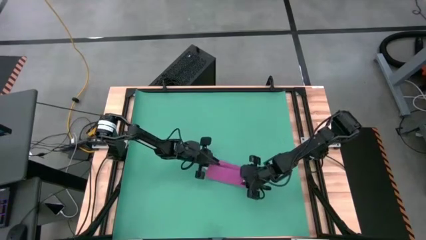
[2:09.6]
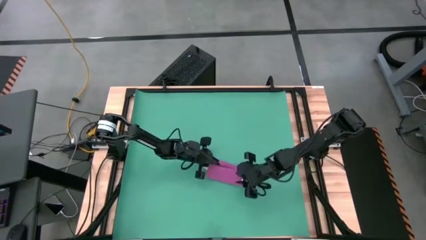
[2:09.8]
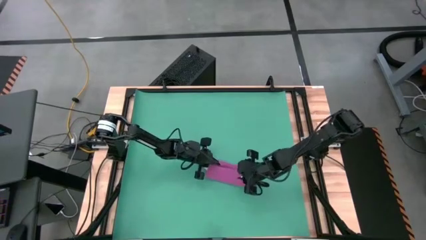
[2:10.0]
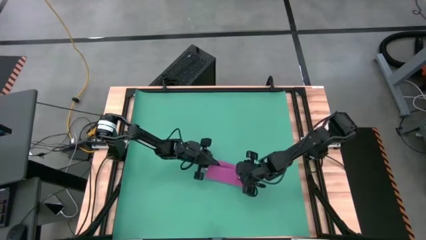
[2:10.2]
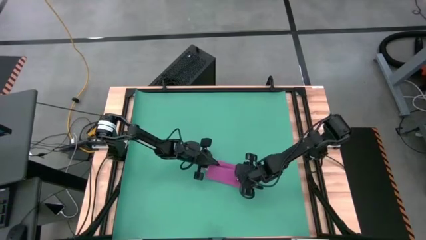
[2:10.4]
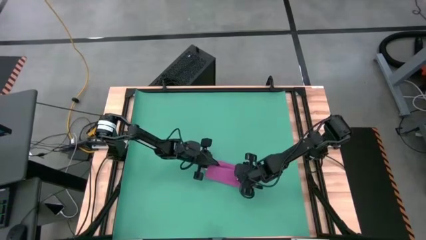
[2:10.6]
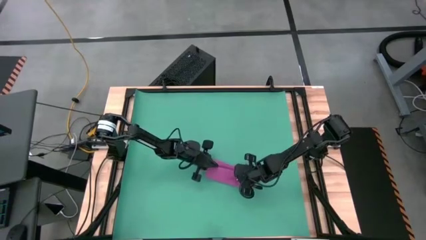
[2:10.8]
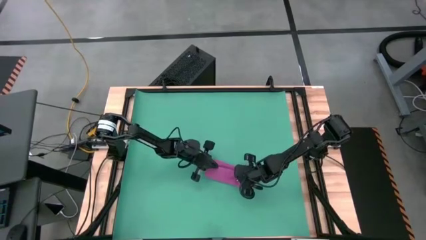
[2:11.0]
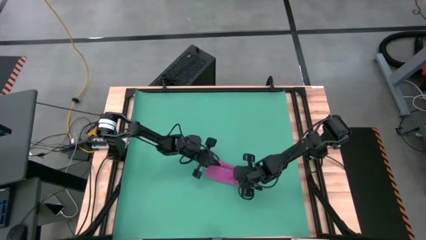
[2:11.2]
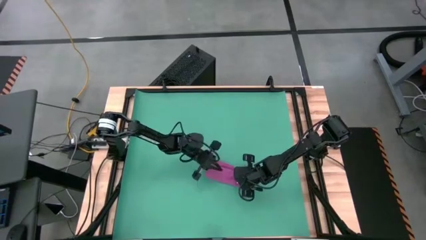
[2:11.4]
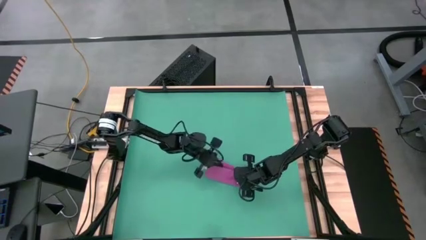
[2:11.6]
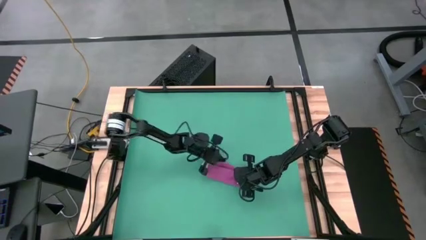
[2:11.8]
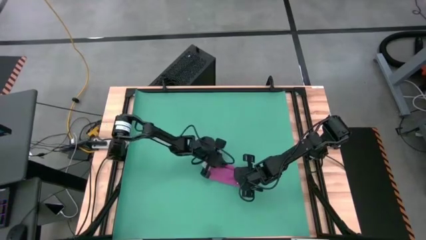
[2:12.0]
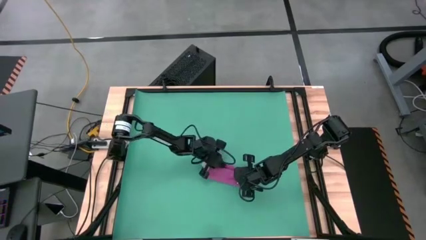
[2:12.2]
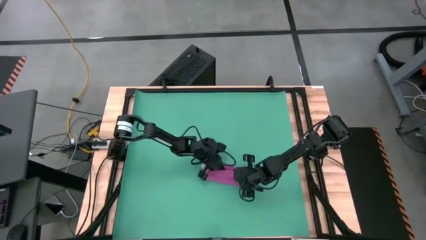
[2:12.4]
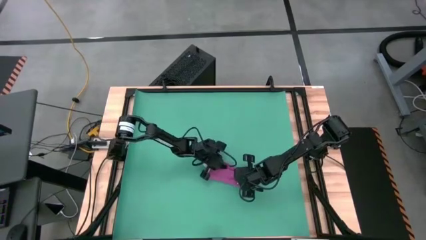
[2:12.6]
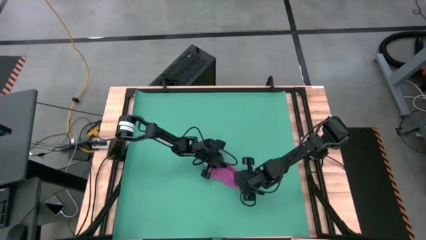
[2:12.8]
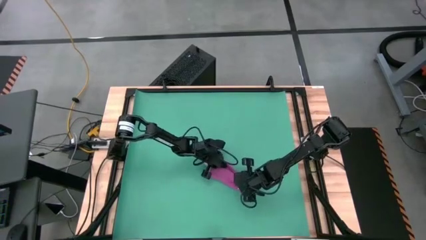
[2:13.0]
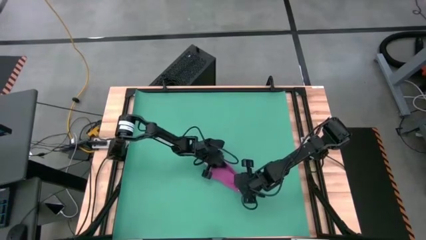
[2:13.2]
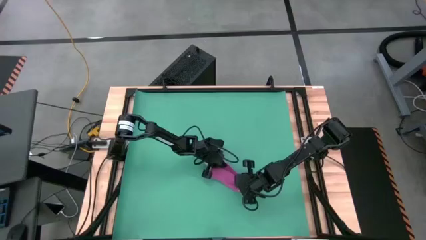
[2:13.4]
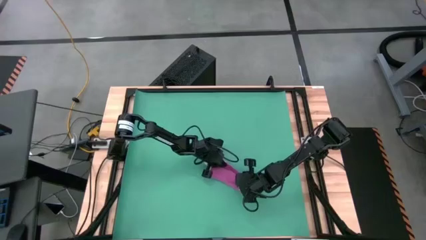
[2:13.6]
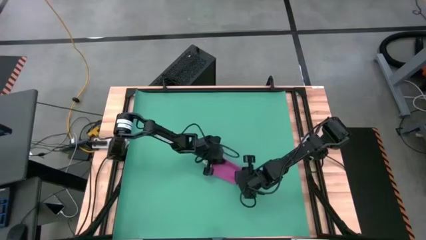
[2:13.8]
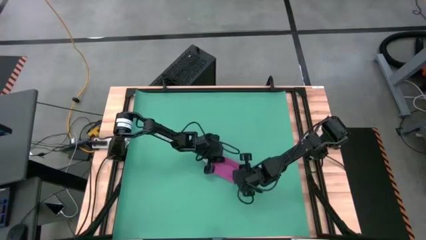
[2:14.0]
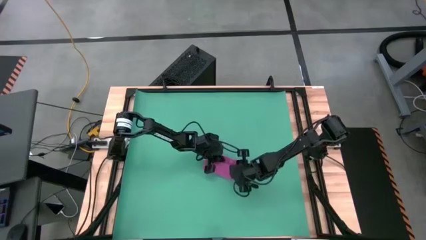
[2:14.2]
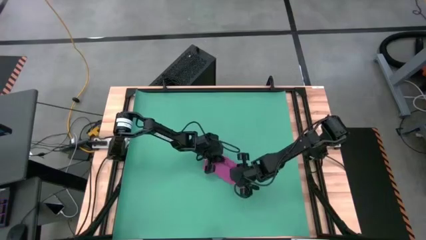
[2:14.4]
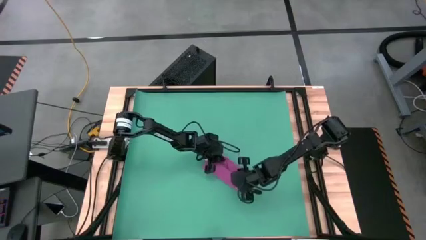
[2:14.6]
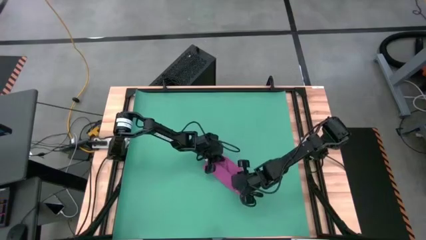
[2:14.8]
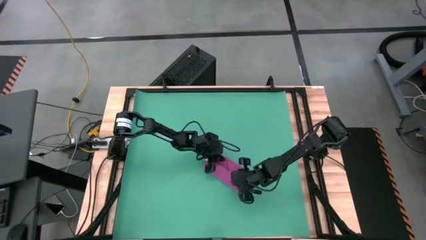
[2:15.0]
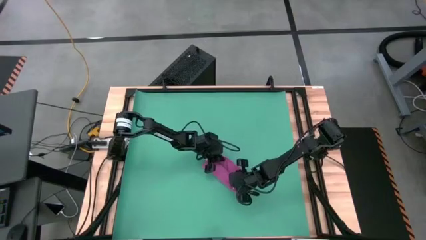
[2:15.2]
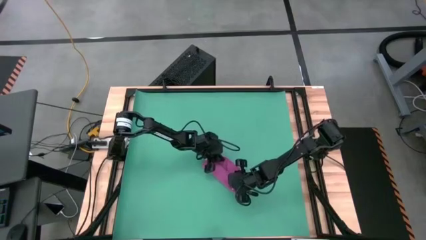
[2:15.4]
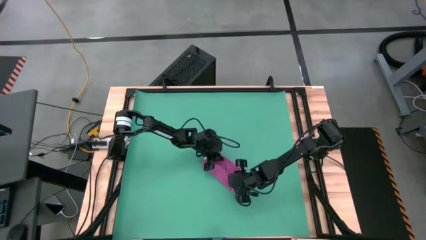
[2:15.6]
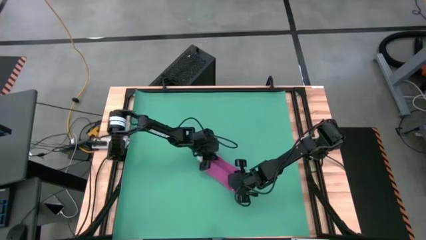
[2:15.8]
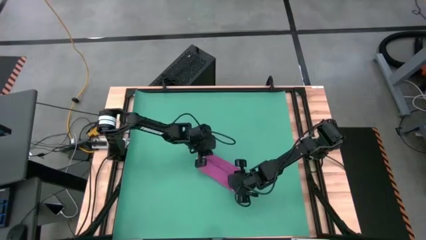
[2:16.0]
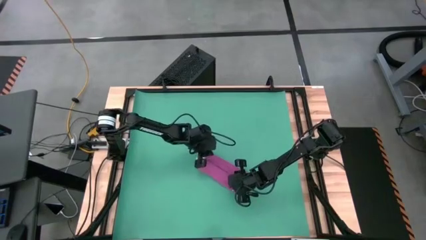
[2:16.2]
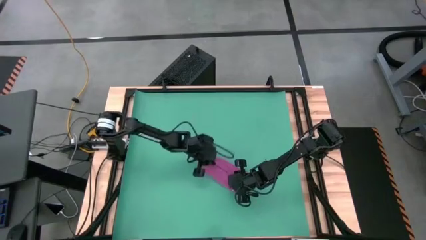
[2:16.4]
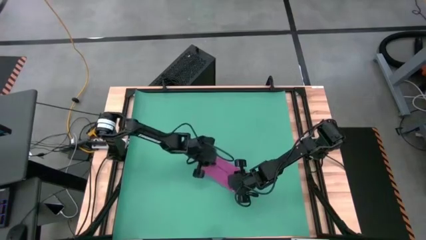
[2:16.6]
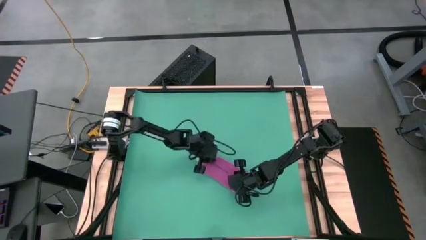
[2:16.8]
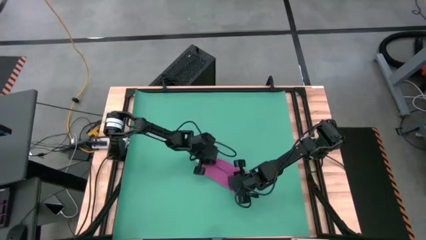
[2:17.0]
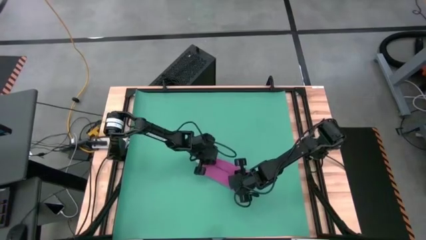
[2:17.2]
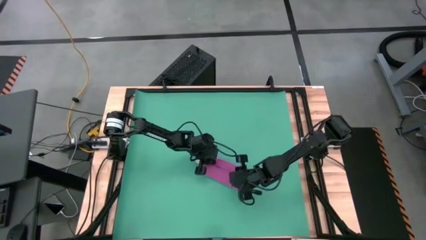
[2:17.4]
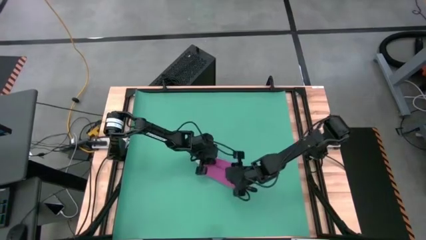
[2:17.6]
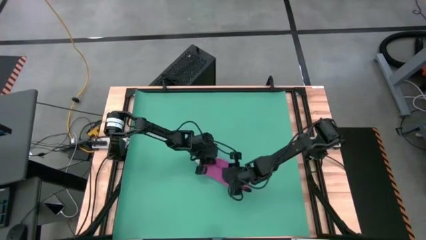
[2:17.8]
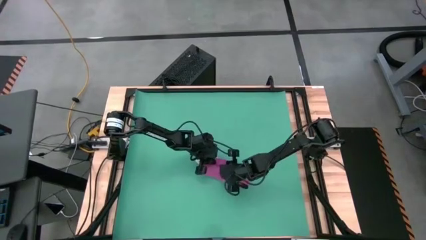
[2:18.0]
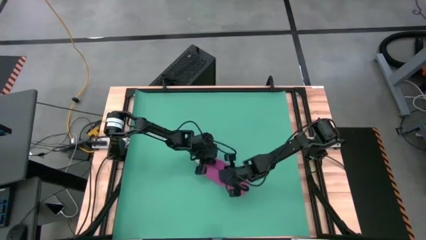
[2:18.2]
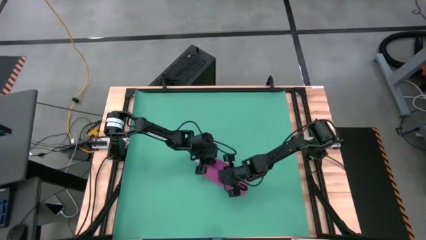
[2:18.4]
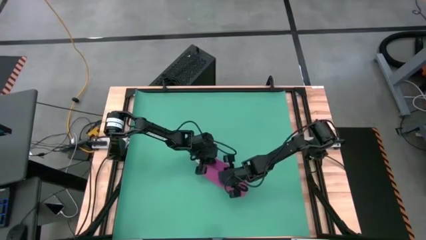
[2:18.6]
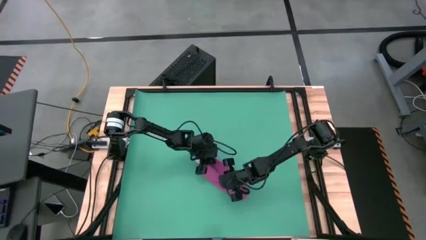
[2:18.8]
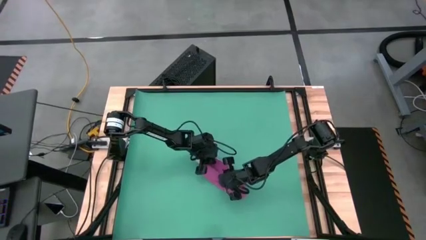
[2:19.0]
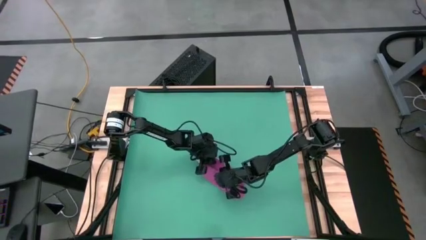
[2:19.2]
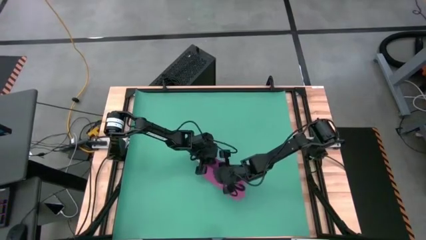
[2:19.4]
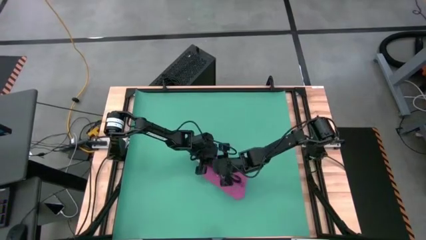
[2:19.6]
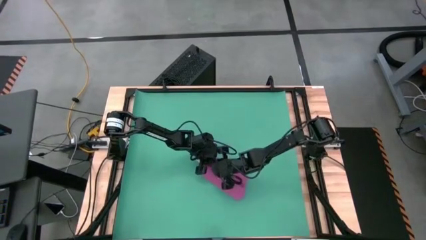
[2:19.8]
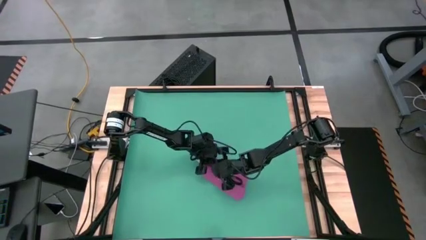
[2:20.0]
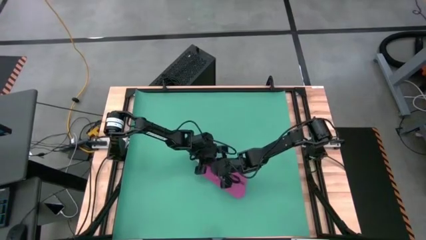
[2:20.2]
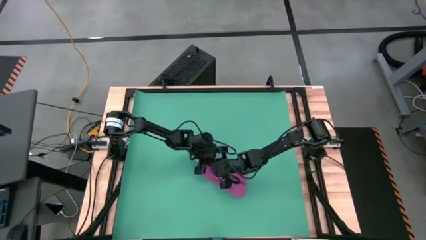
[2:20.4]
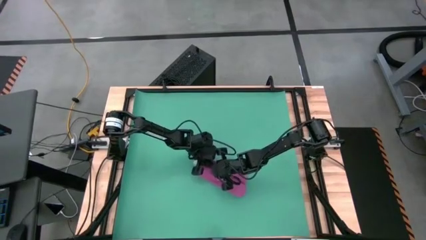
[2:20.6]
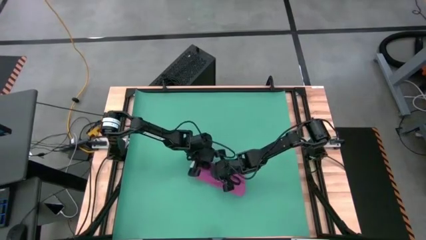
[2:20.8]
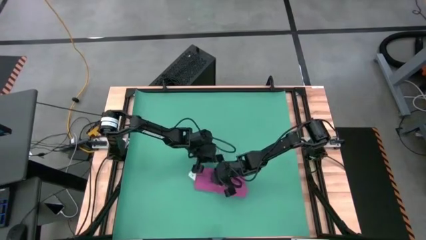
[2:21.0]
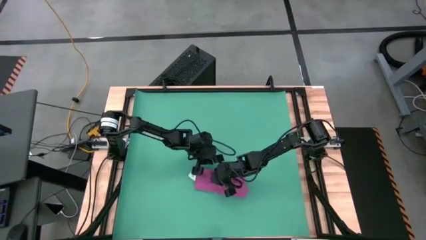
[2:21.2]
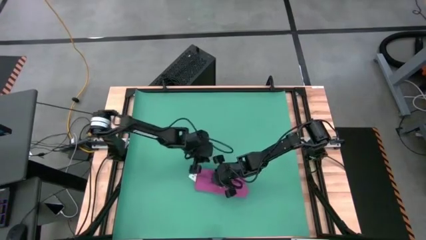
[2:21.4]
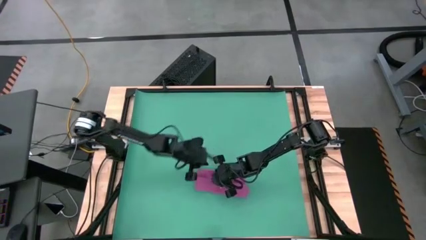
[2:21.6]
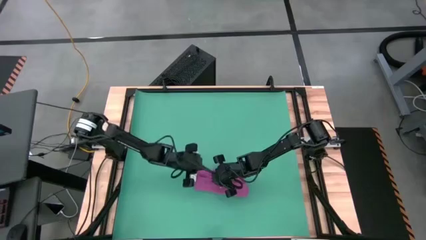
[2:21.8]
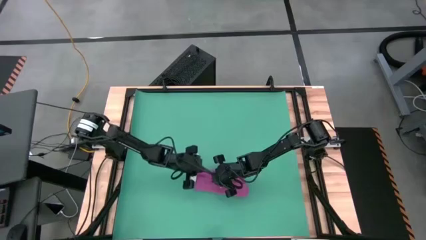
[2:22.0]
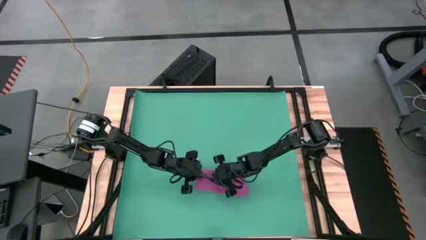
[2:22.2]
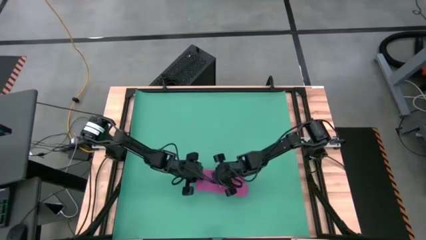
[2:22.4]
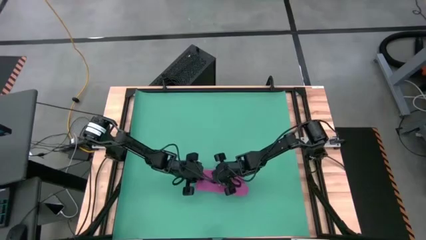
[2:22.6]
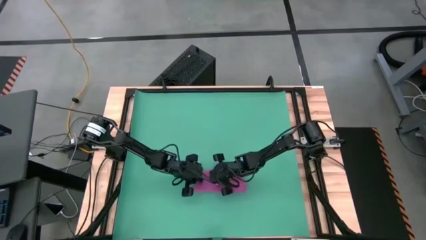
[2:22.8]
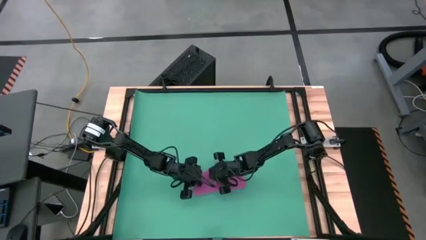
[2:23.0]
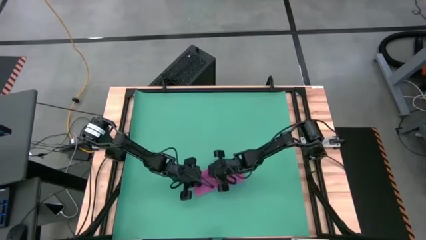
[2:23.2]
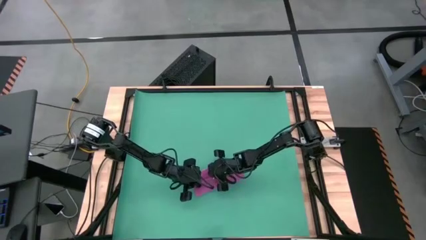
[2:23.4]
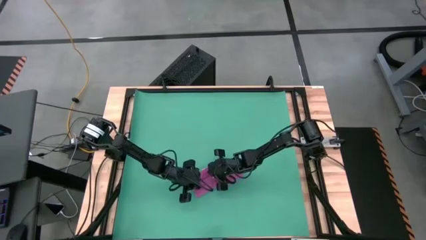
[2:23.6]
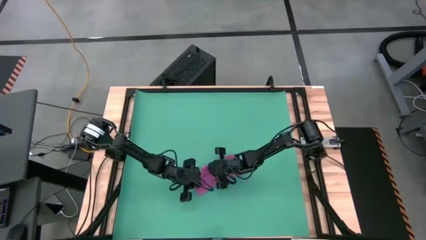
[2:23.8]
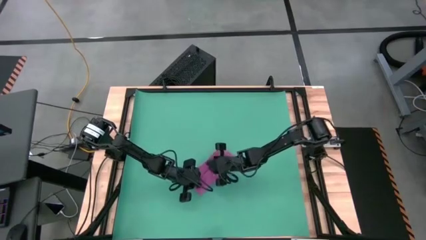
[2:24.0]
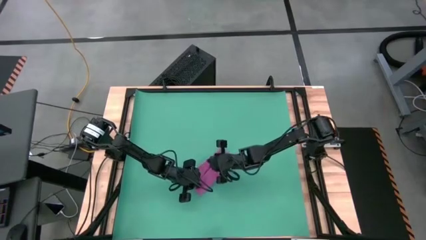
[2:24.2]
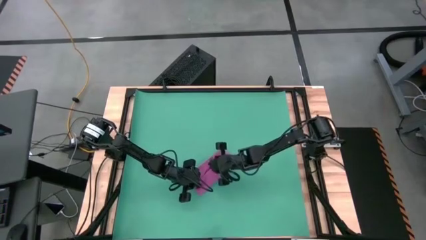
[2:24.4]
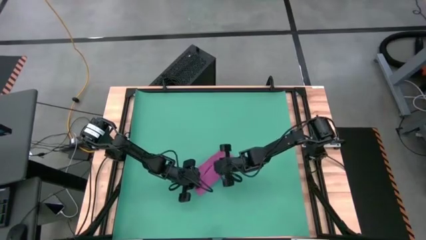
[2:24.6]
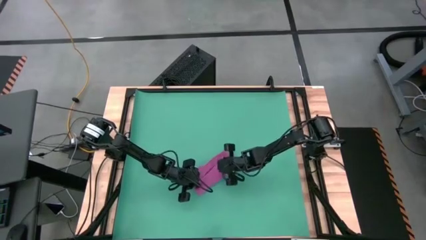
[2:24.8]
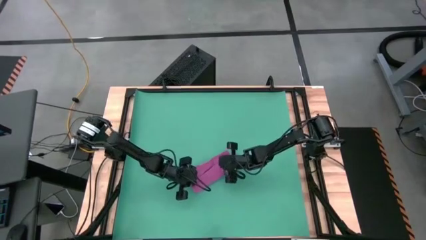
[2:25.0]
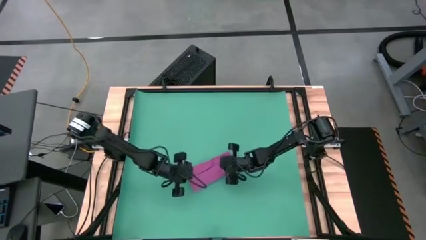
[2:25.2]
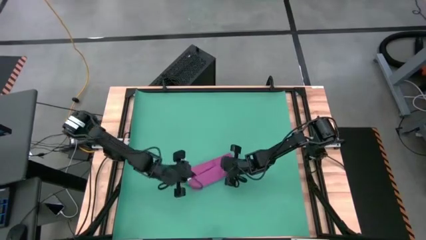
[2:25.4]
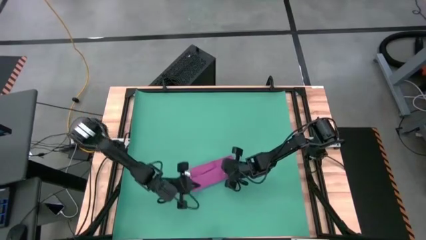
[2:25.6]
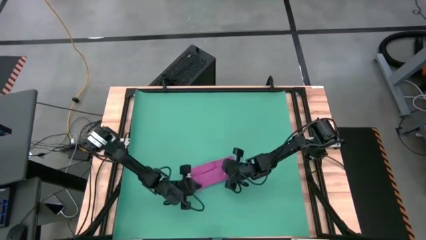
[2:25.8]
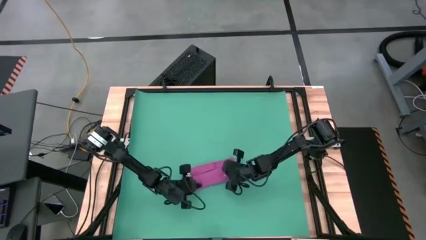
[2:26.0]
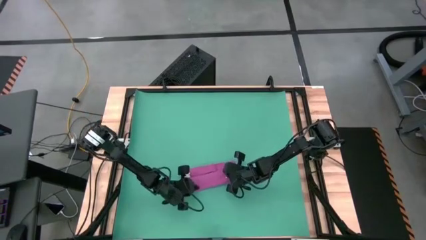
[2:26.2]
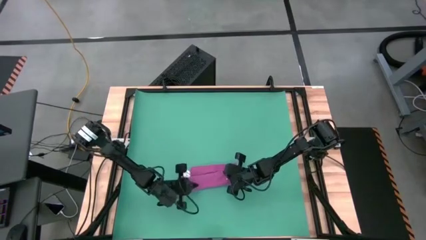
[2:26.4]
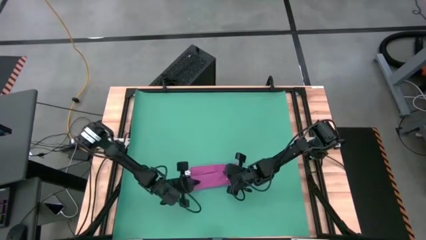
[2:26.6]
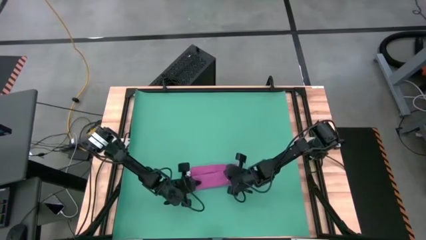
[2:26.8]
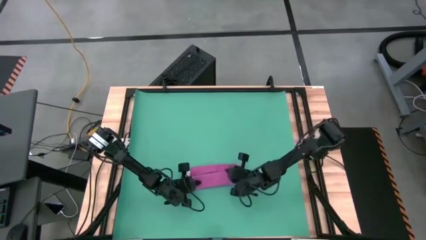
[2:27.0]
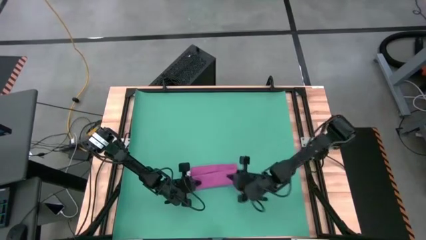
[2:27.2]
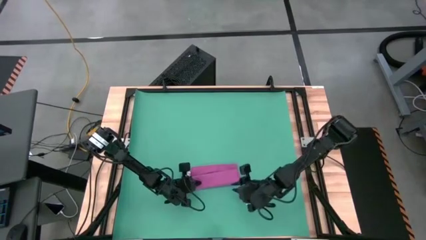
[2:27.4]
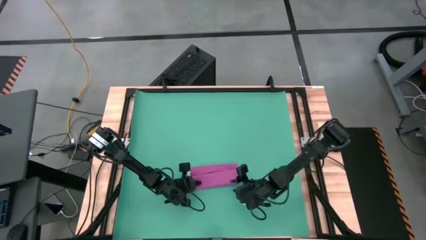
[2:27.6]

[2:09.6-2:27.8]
Task: Roll towel
Roll the pink towel
